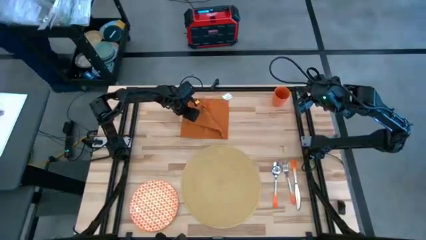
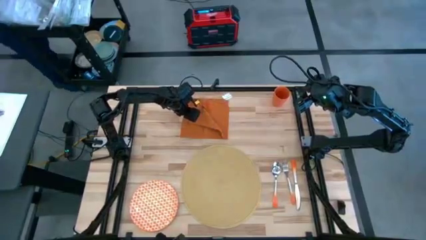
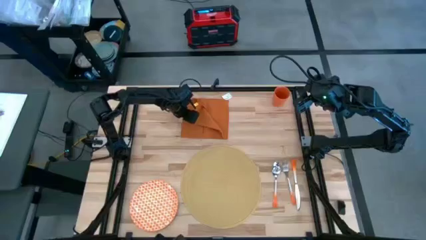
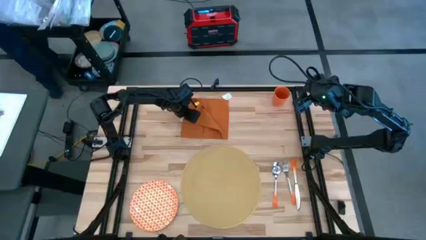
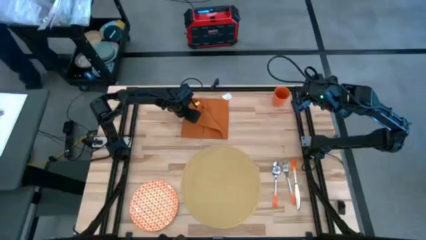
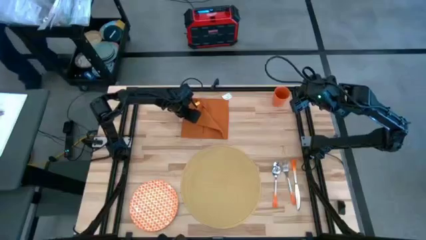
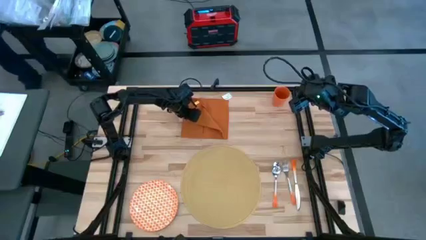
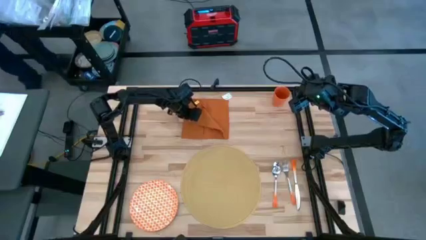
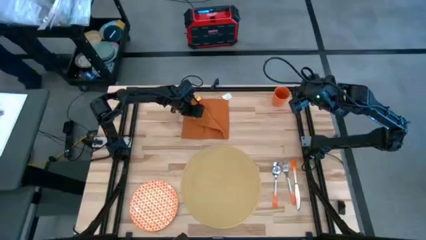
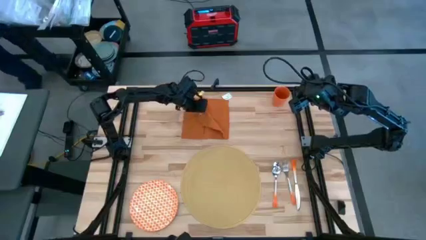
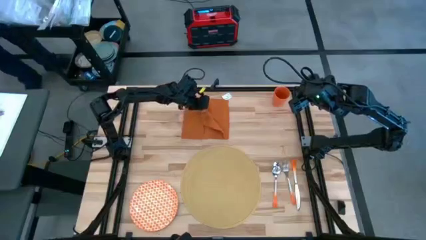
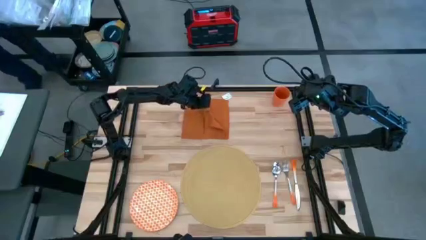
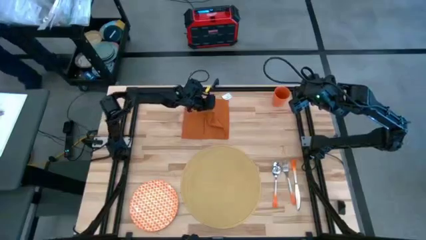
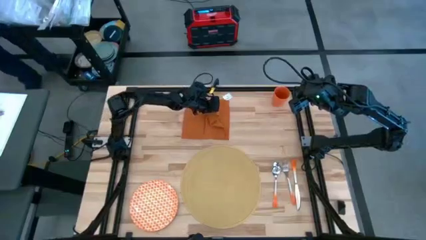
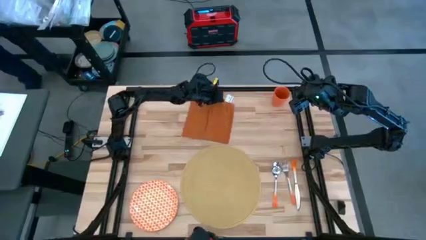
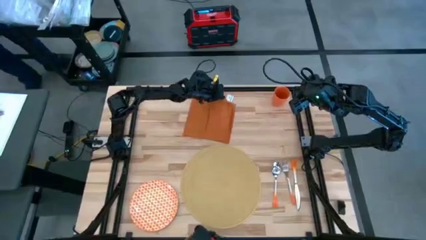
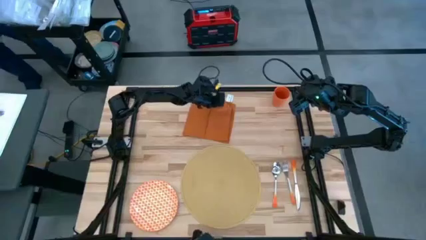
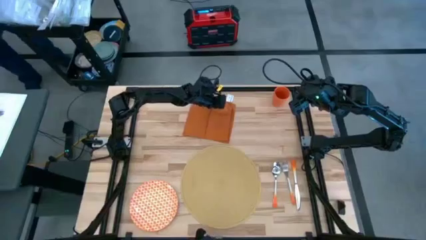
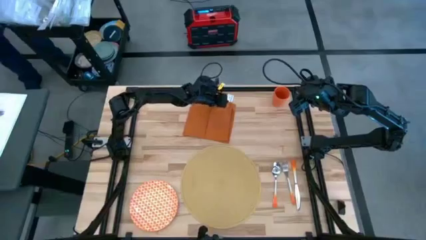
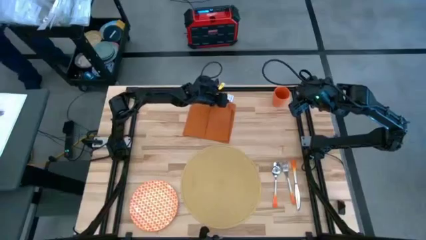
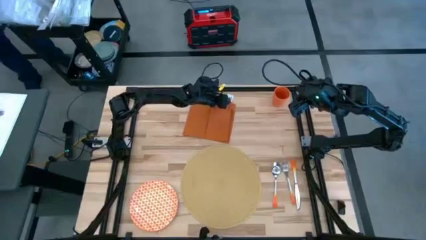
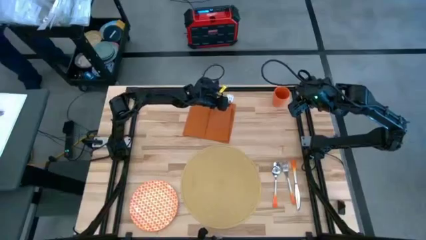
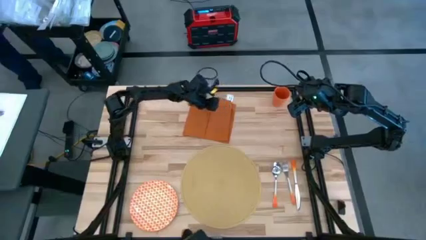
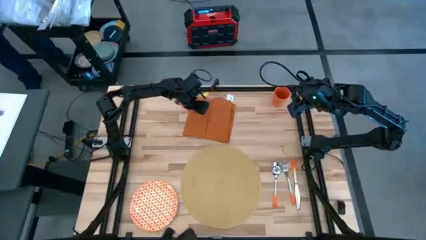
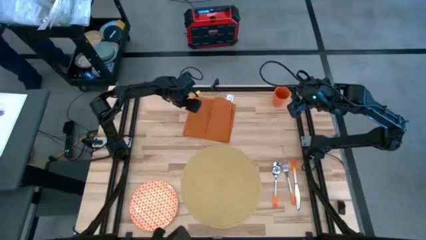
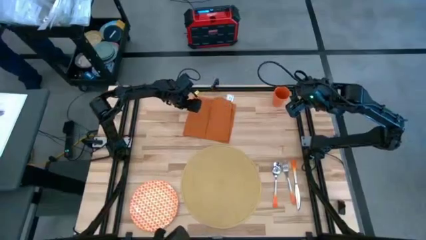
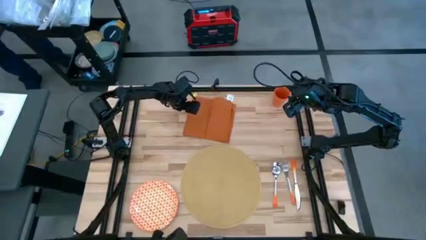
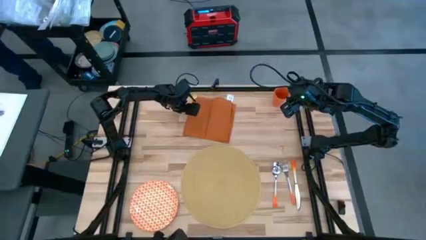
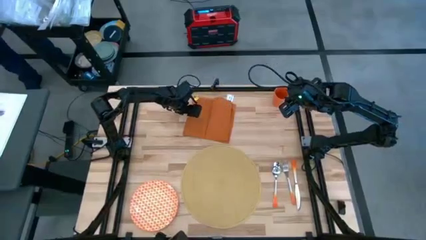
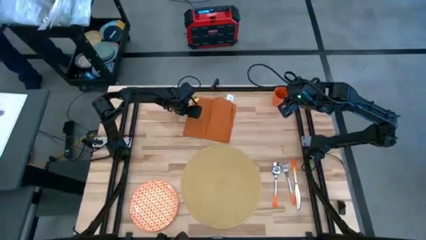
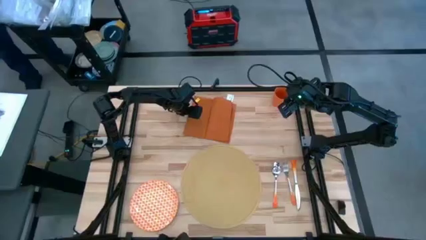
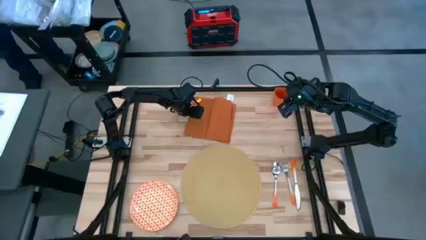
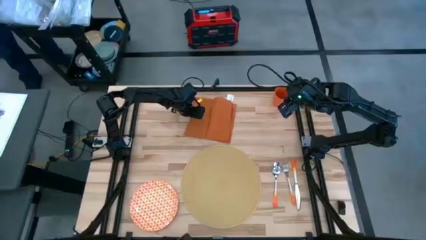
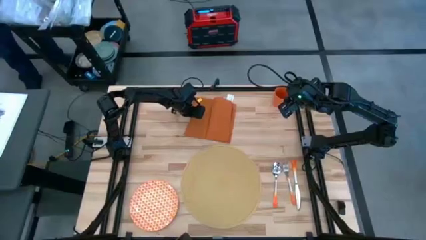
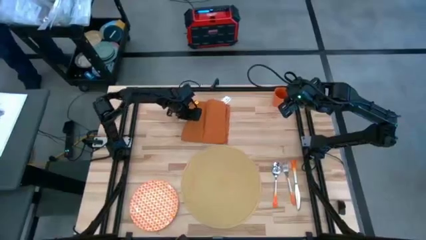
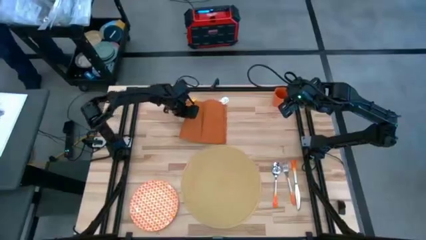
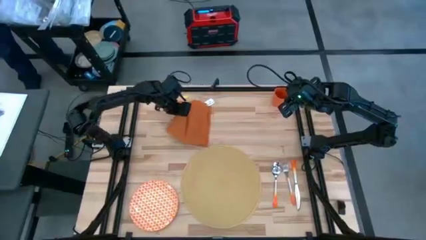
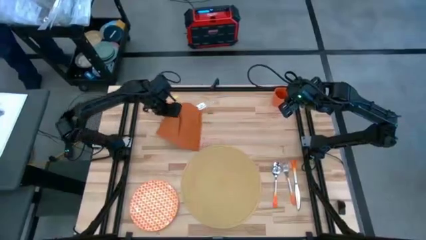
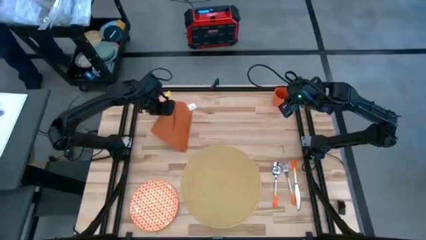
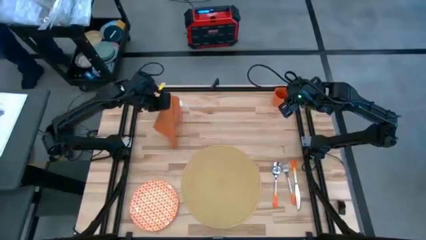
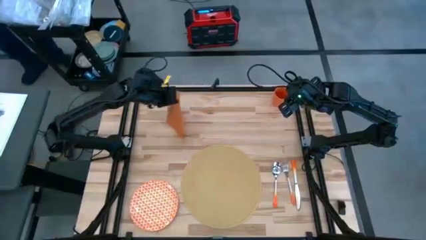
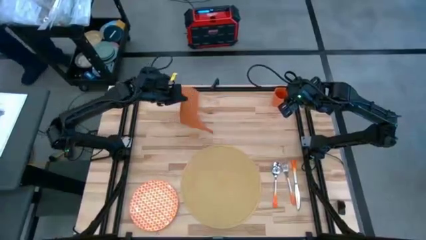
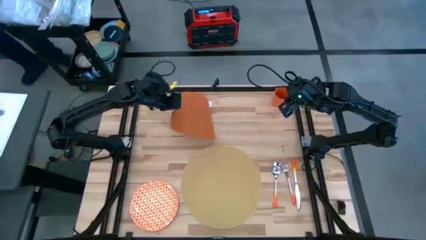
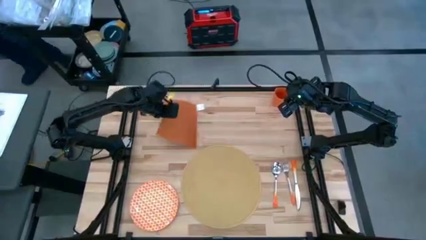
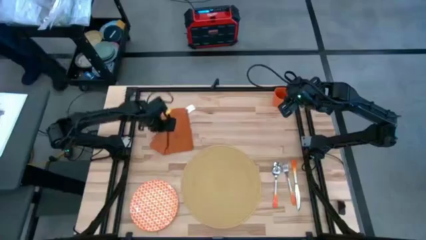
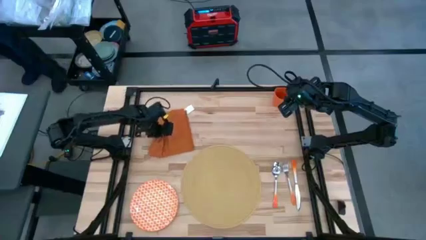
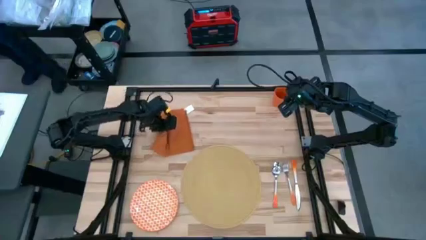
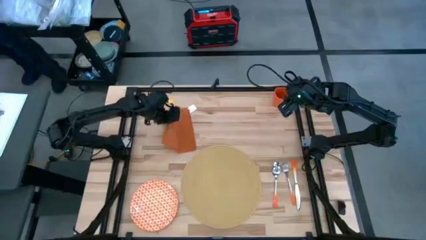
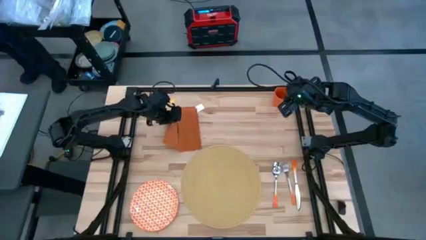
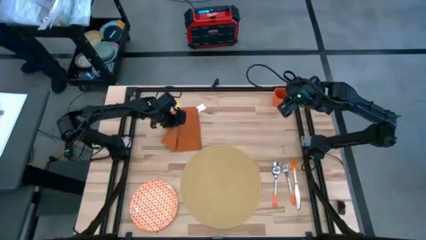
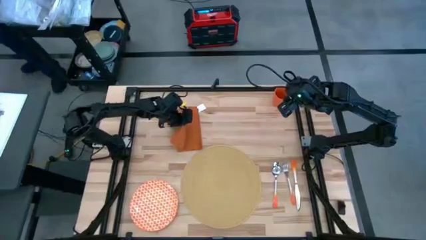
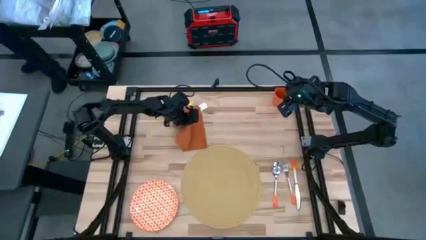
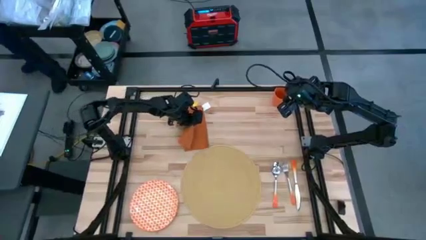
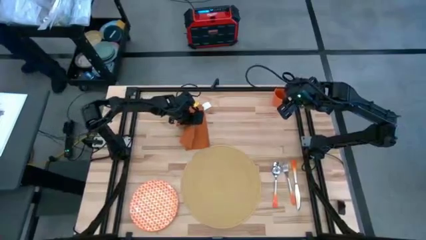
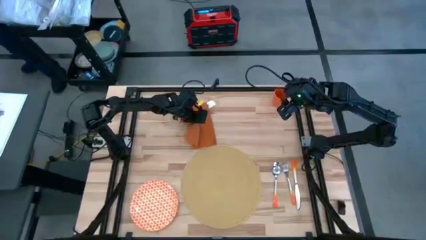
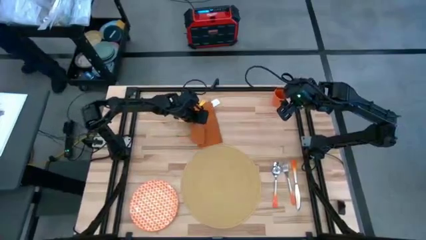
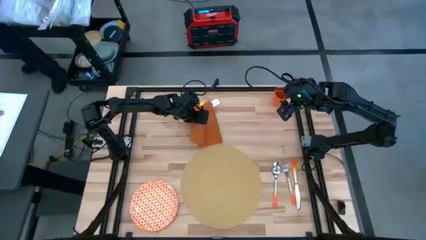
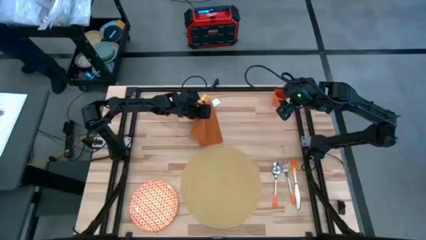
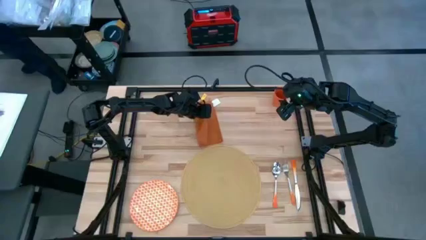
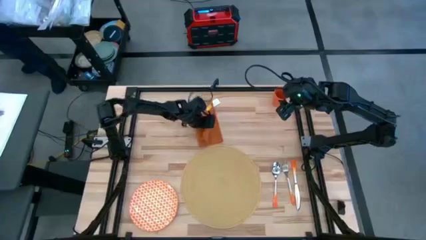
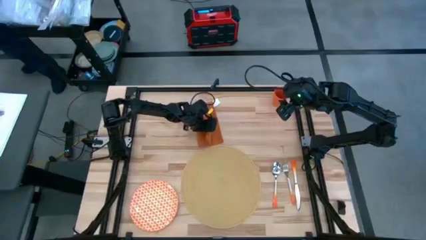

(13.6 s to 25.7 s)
Task: Set table place
Fold the orange table napkin

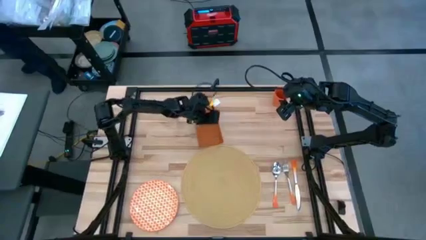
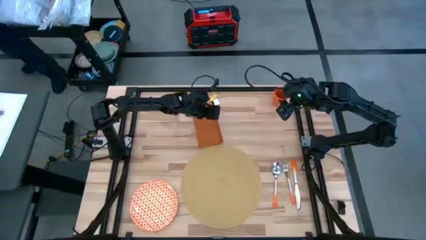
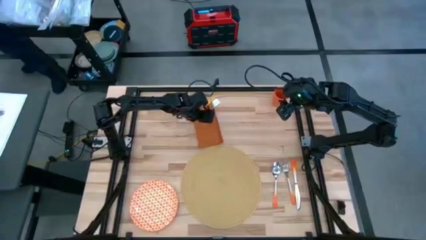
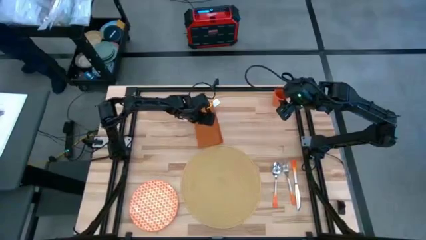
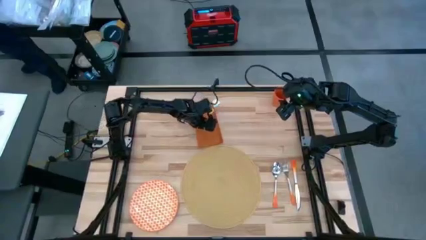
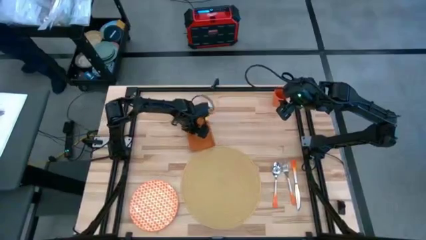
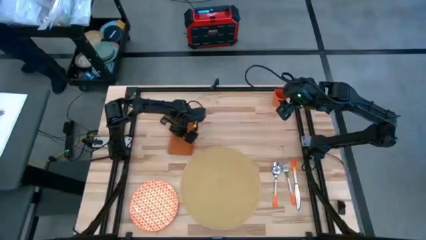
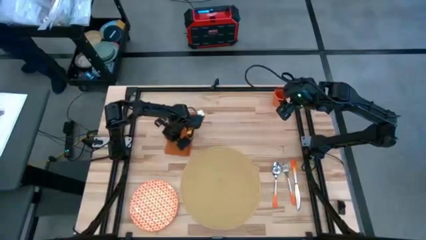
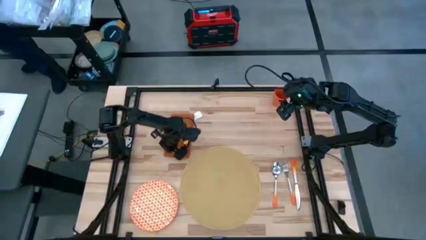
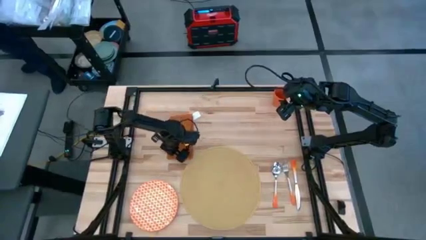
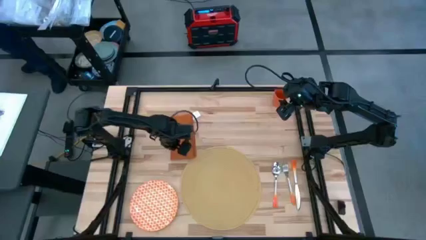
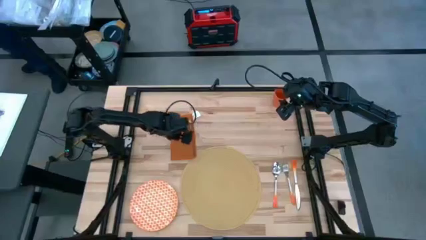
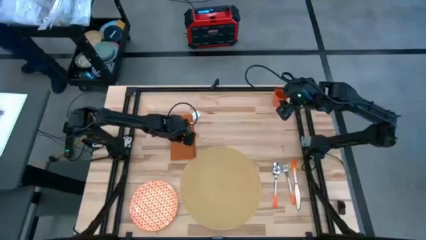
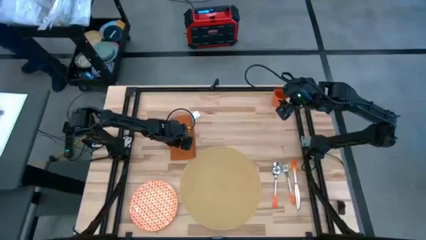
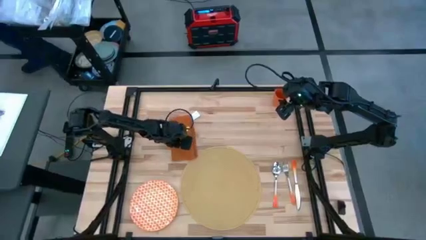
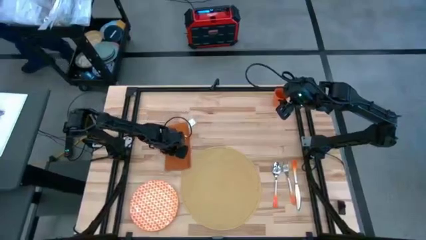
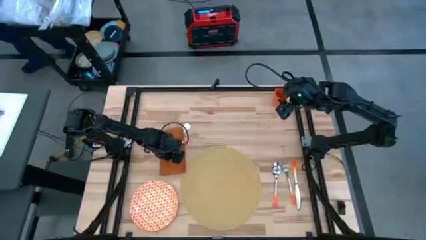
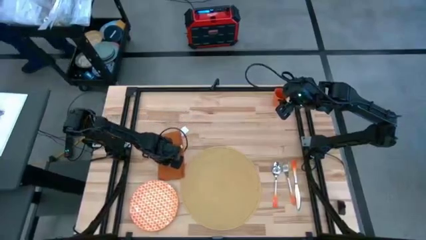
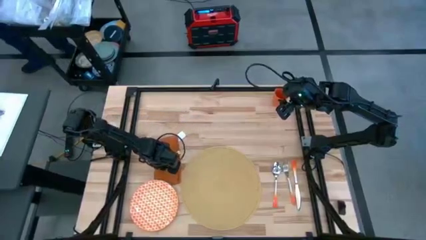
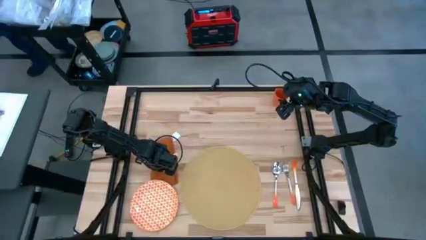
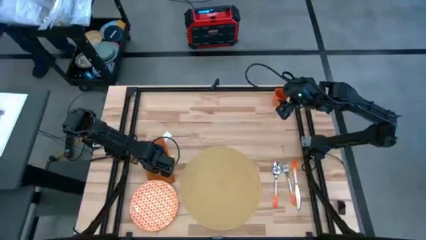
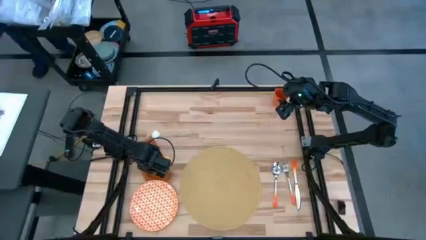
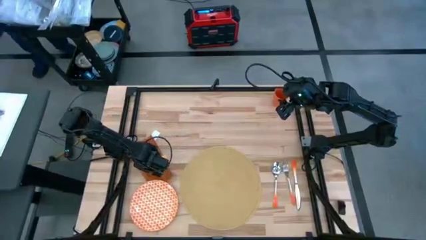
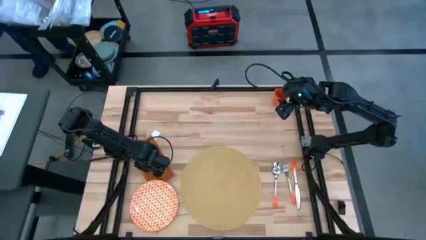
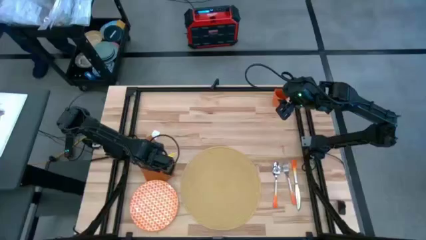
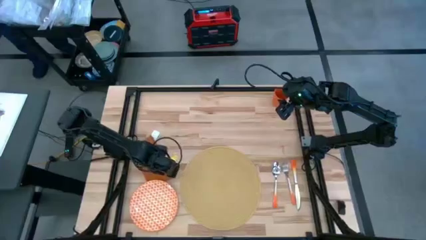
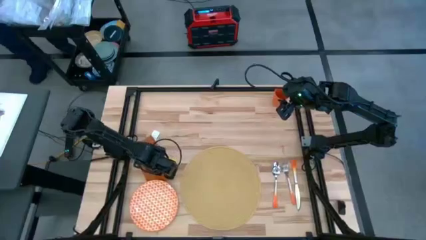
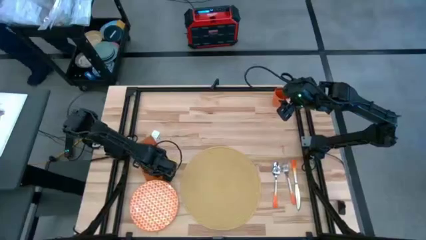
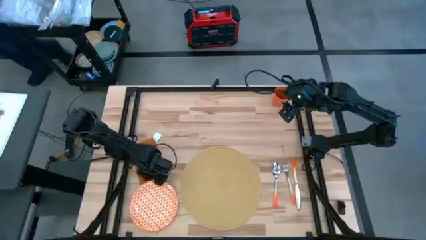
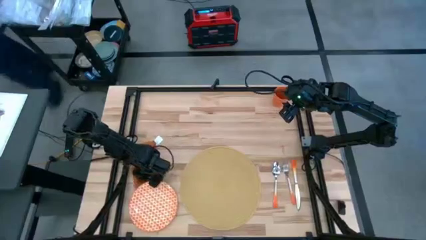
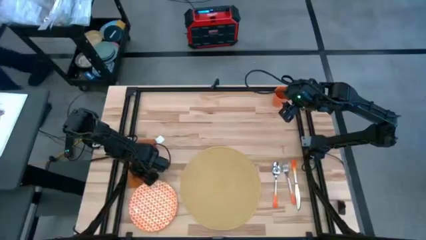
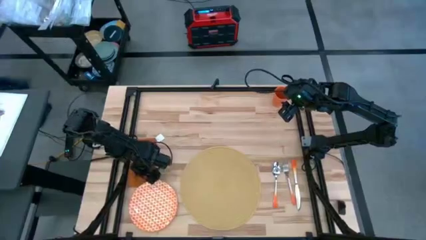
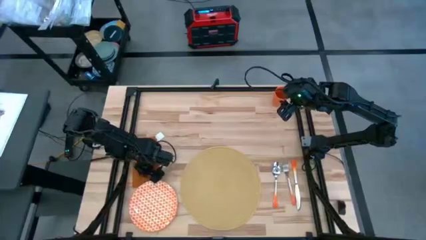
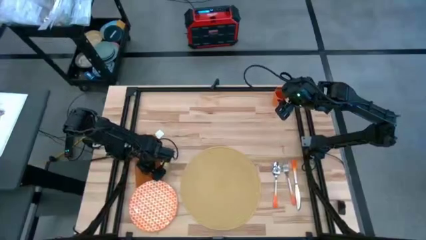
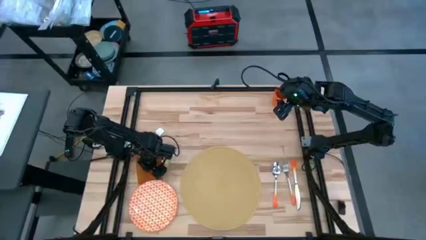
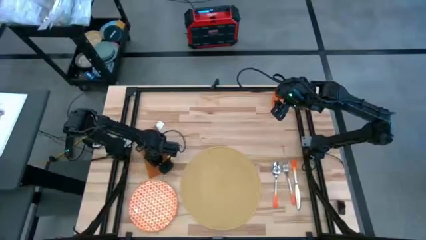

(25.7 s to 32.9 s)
Move the orange table napkin to the middle left of the table
